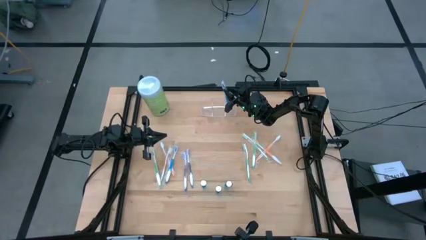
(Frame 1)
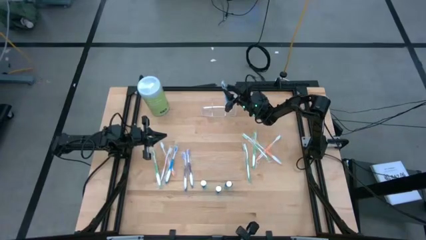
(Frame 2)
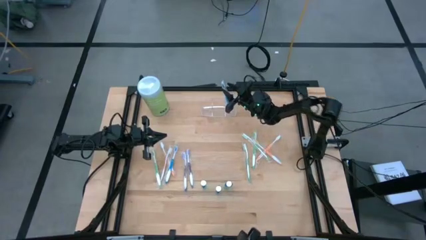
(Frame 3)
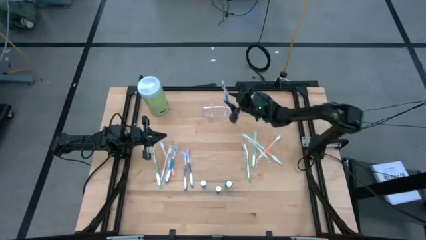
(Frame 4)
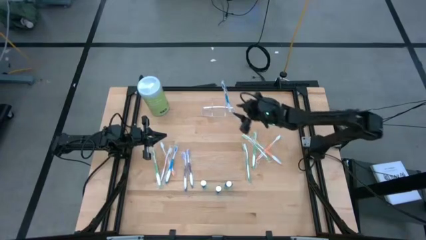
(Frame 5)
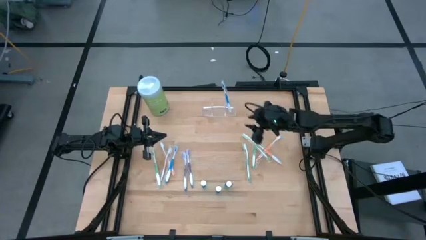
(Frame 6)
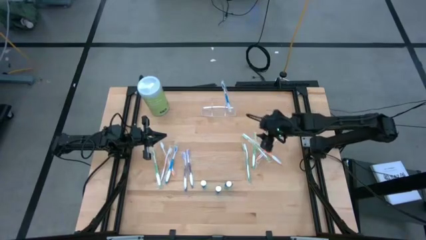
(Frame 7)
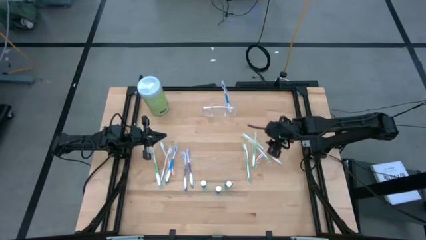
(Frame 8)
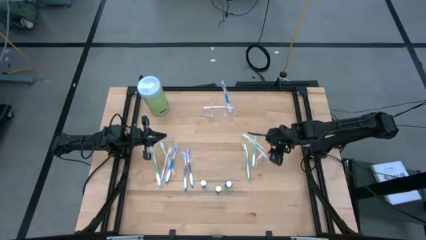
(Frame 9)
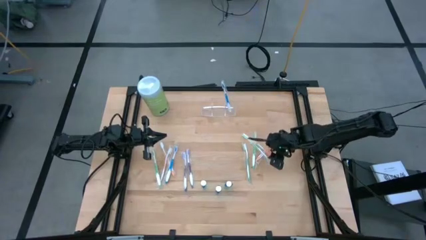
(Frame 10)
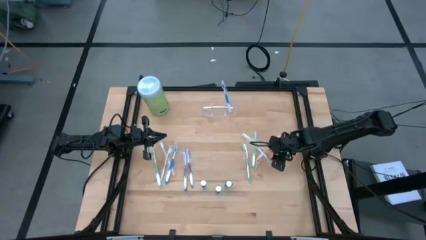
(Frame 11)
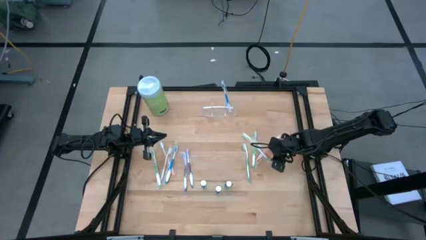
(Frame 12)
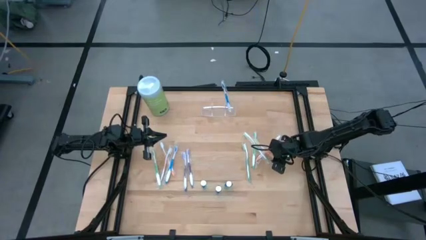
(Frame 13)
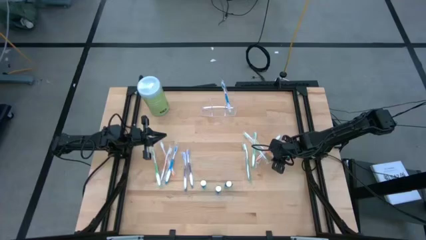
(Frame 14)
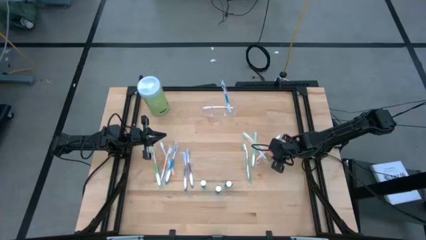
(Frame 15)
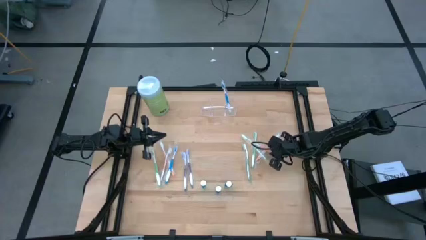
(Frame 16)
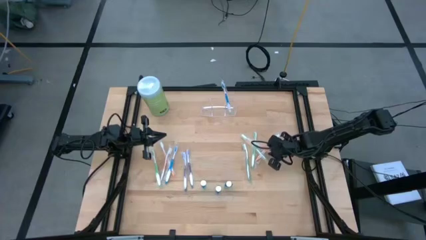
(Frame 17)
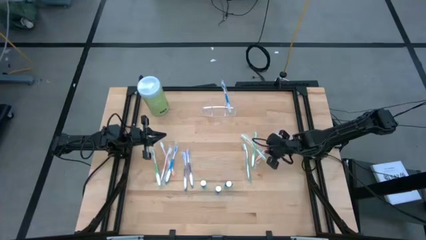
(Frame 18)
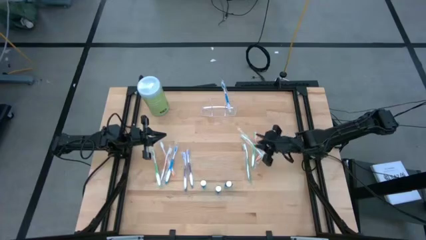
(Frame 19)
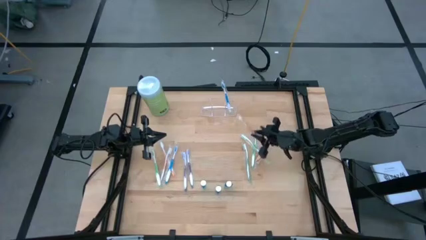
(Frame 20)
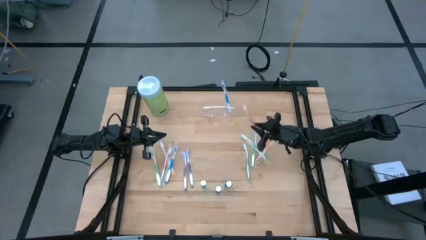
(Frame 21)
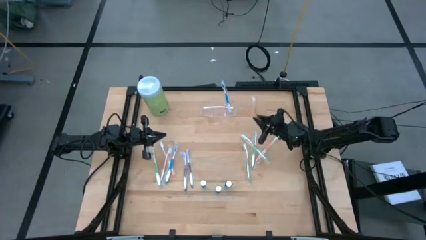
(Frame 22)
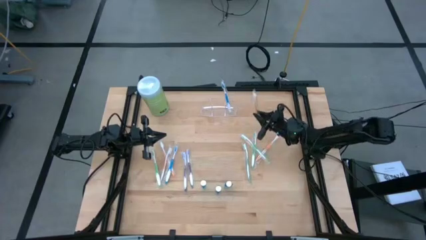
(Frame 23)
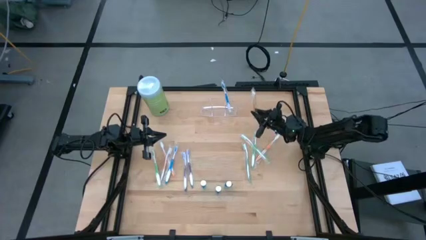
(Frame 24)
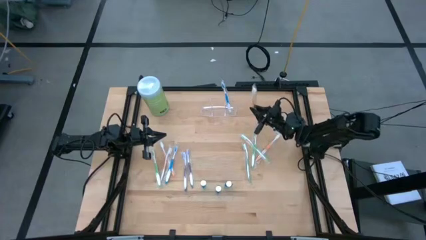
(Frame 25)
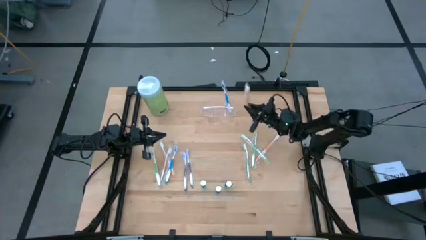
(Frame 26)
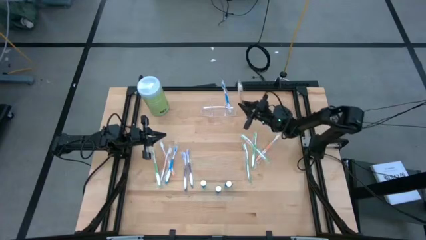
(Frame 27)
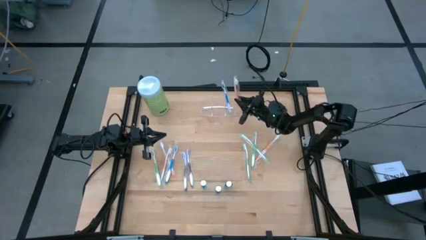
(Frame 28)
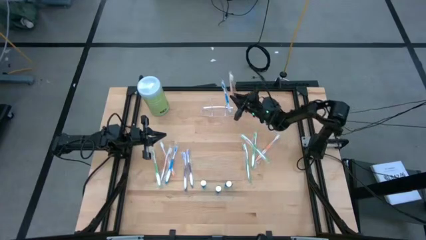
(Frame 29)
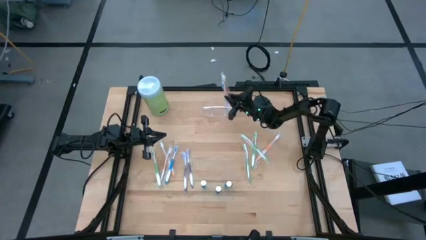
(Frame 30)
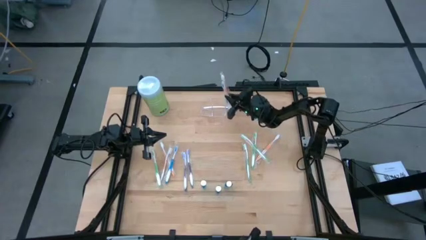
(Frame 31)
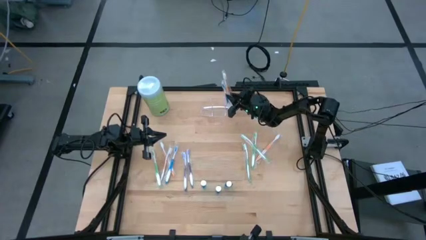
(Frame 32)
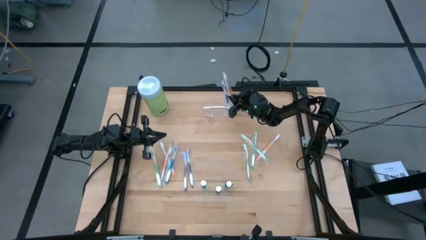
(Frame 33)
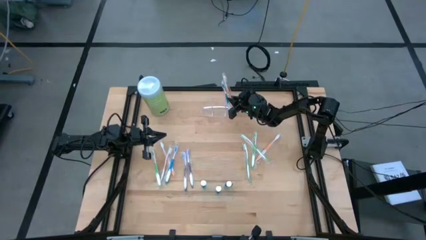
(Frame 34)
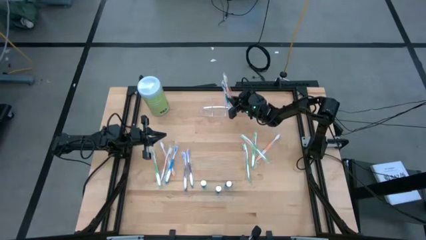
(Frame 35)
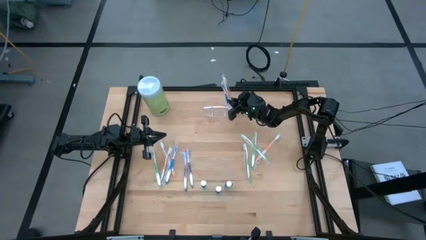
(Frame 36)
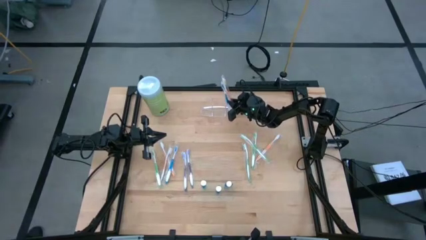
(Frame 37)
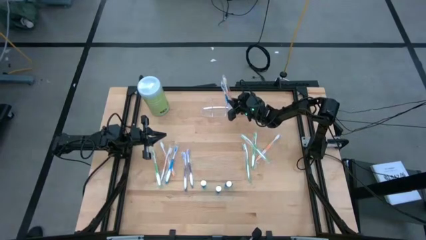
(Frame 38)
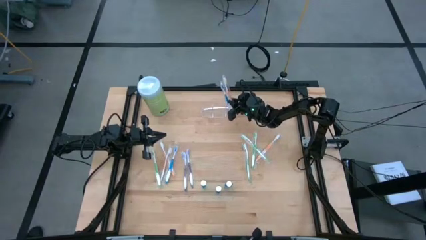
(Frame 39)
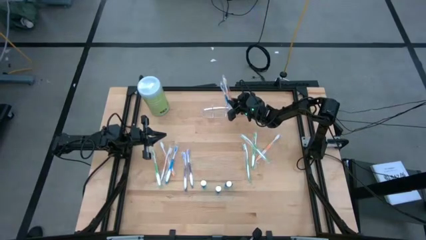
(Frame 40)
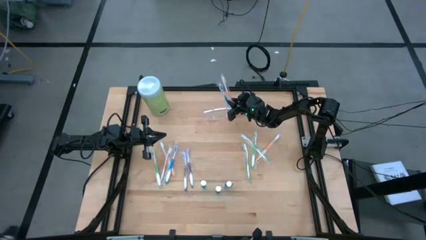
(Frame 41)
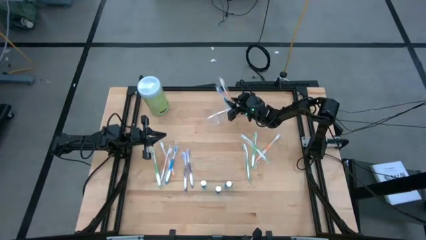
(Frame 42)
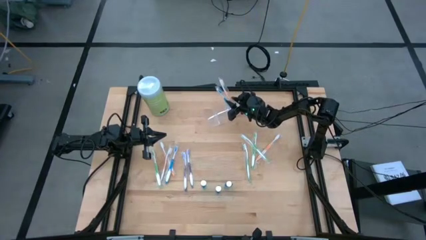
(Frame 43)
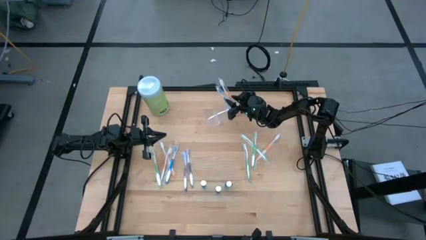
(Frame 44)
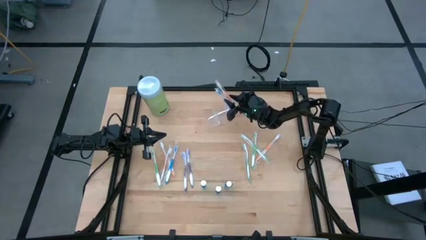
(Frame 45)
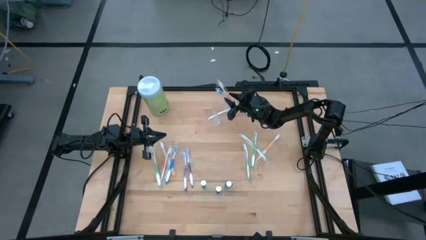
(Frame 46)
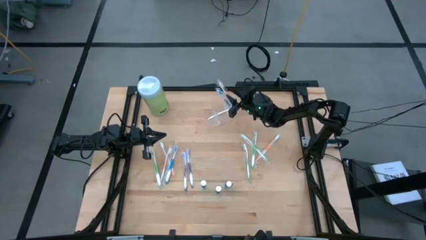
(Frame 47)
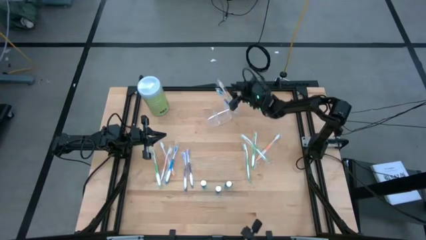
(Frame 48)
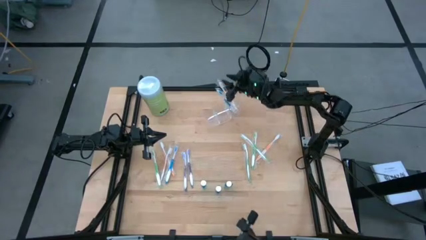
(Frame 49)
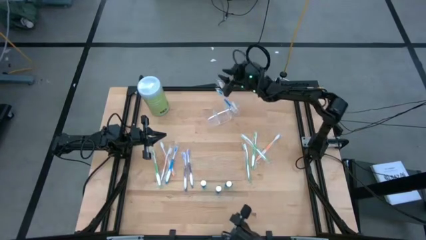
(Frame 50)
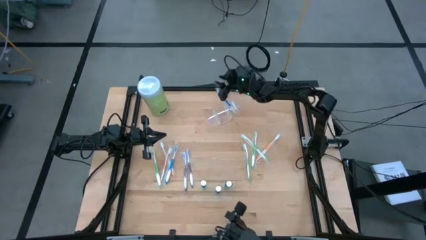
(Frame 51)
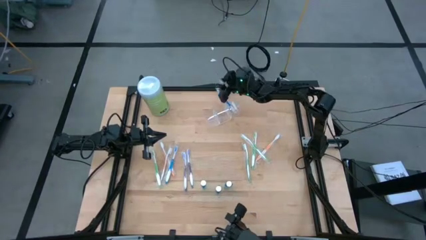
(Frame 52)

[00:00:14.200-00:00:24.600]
Task: Pick & Place toothbrushing station
Put the orange toothbrush into the transparent organizer

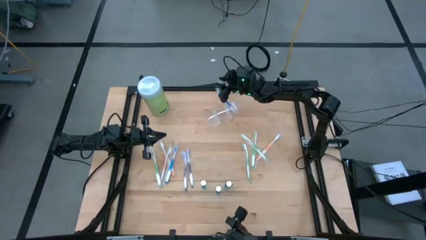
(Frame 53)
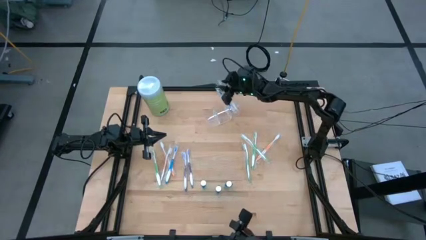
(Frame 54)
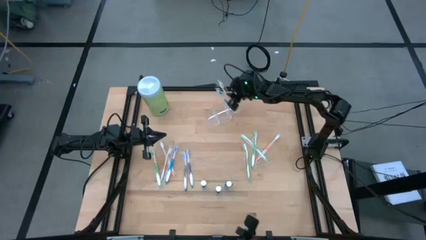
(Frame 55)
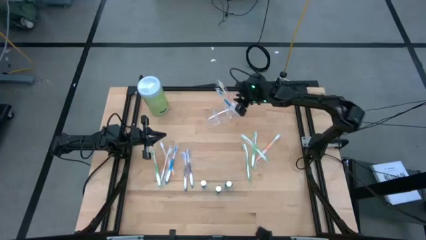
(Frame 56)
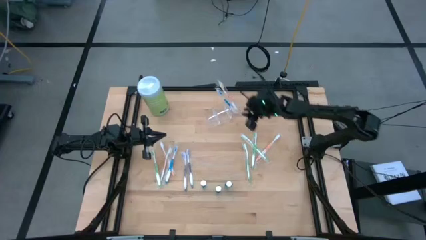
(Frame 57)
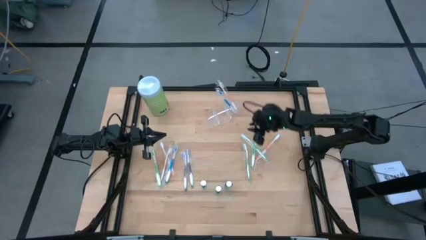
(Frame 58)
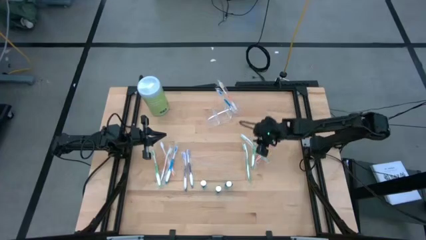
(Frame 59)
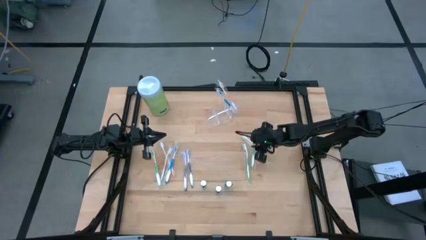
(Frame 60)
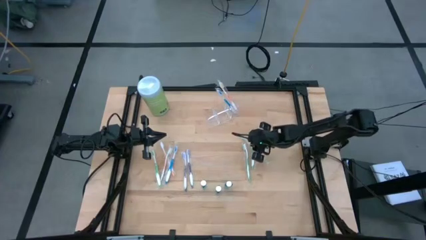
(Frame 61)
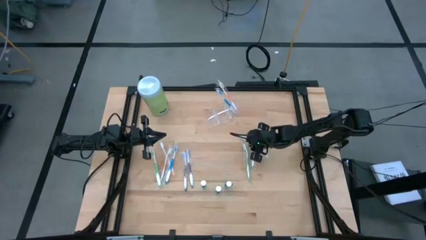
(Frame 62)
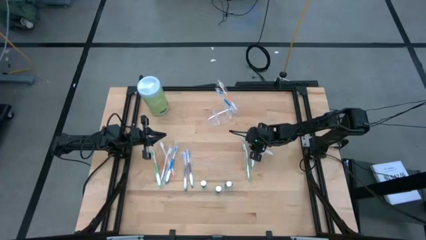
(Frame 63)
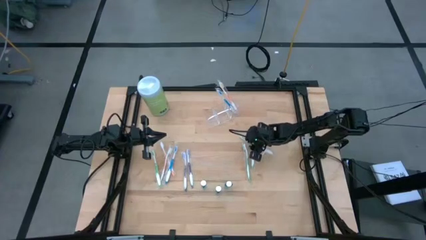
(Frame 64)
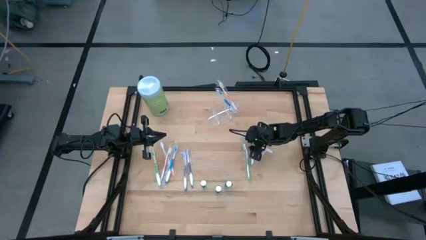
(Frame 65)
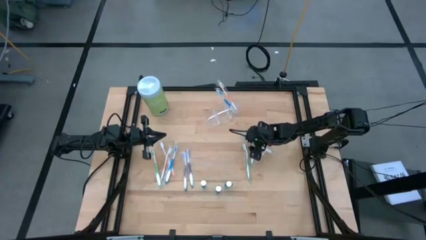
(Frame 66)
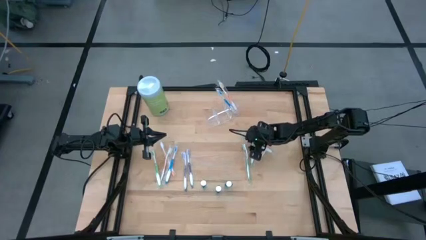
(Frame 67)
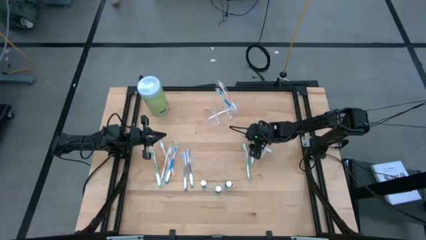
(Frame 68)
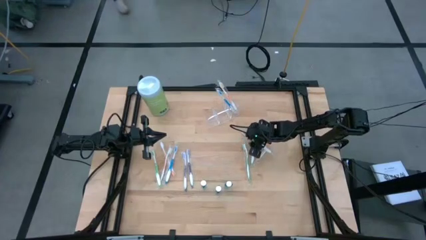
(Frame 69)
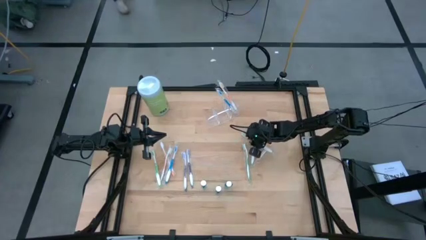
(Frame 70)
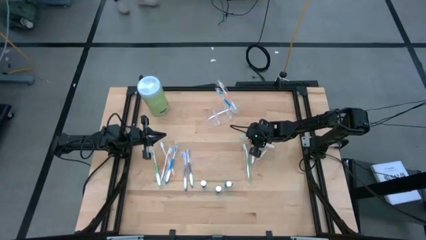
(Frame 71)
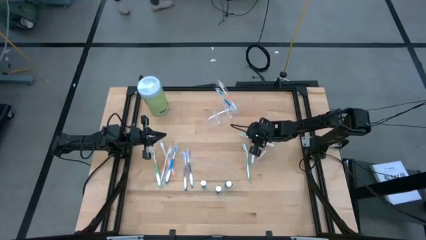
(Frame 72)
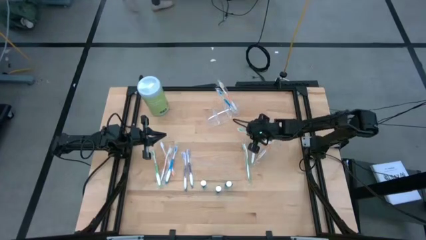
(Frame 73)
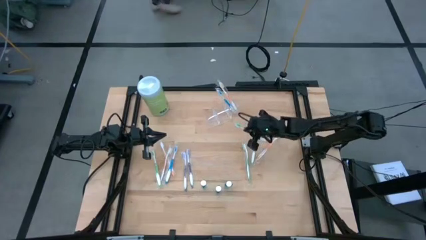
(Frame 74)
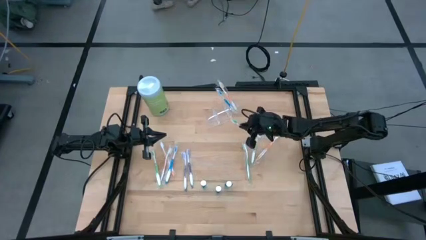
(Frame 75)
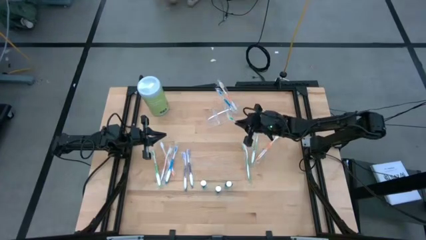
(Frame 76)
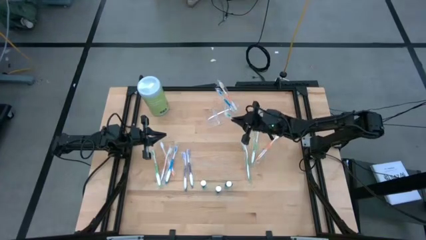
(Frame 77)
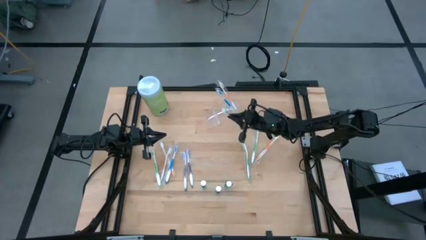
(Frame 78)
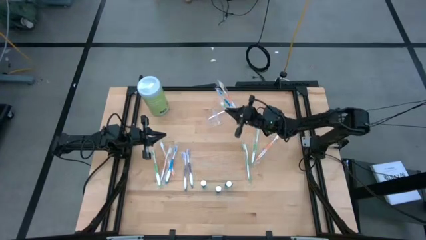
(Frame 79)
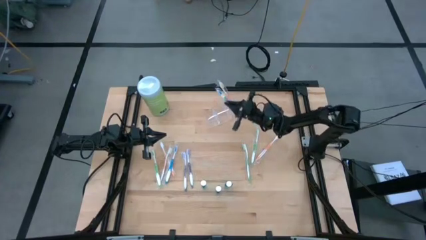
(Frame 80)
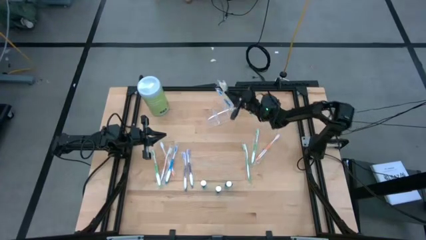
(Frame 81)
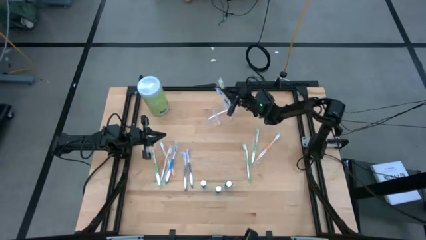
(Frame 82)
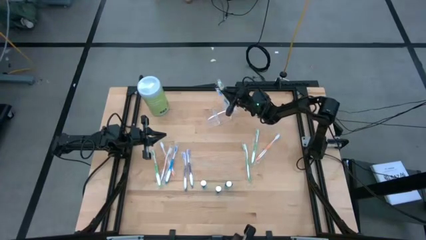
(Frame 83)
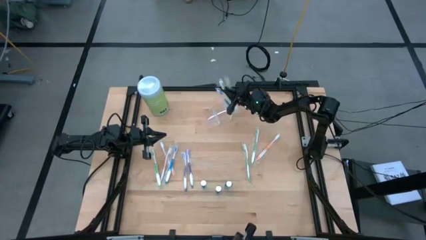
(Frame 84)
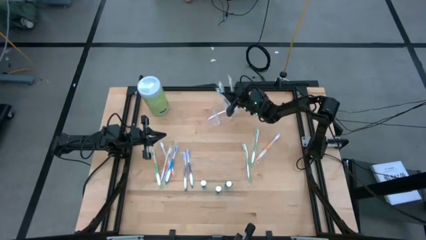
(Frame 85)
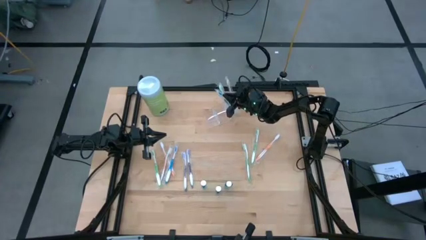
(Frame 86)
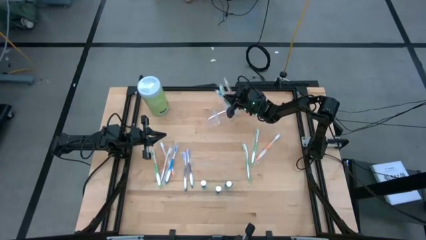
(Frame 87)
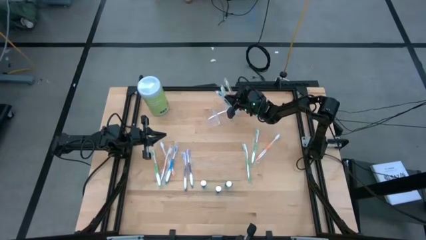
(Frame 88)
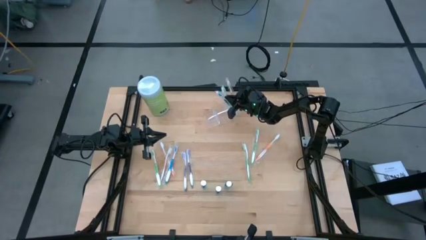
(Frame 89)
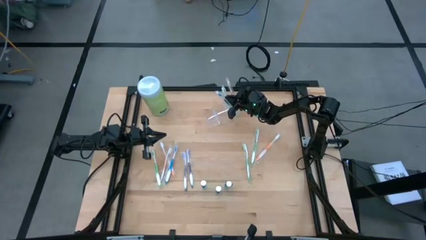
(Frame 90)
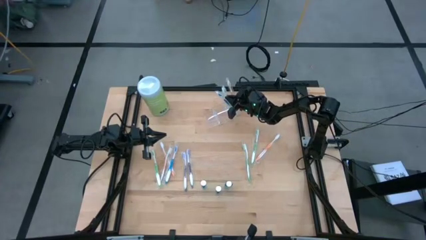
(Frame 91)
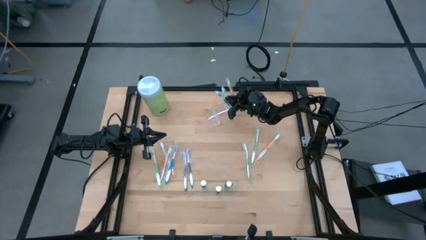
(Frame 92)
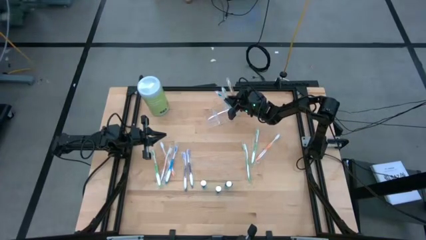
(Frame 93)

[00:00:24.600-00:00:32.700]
Put the green toothbrush into the transparent organizer
